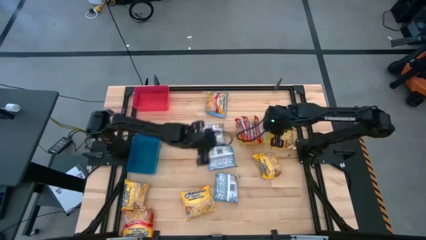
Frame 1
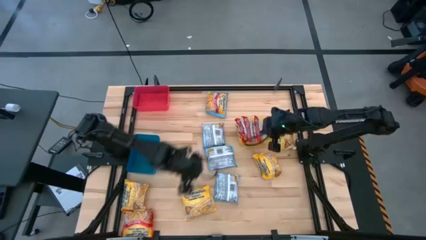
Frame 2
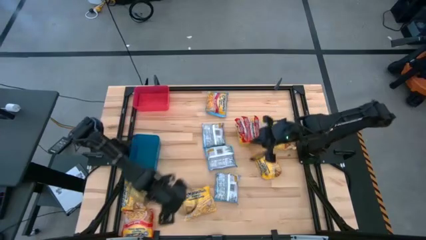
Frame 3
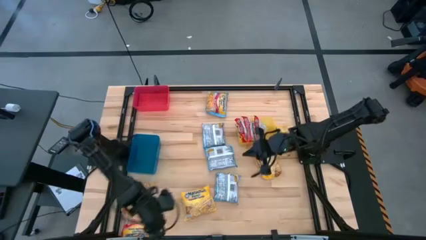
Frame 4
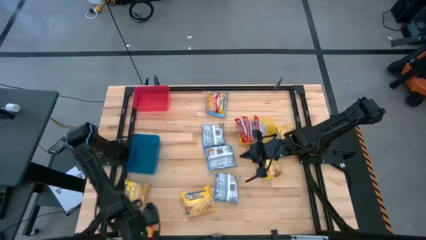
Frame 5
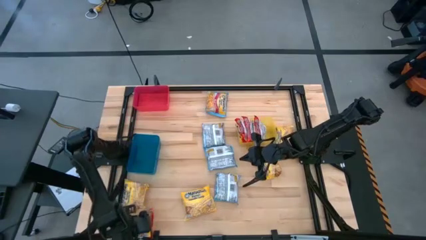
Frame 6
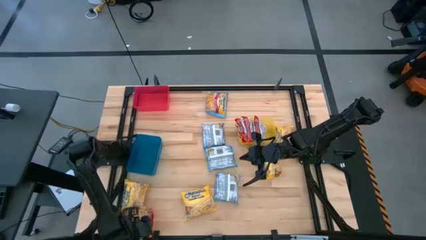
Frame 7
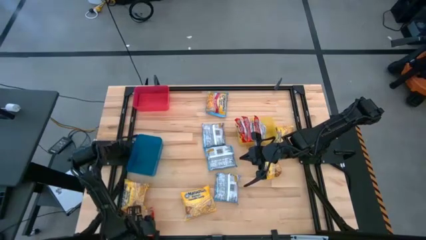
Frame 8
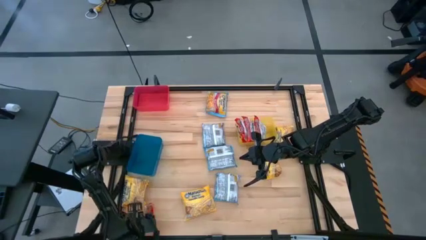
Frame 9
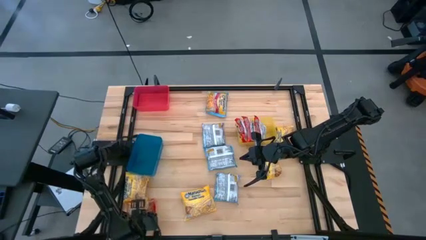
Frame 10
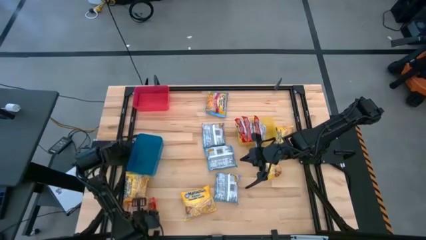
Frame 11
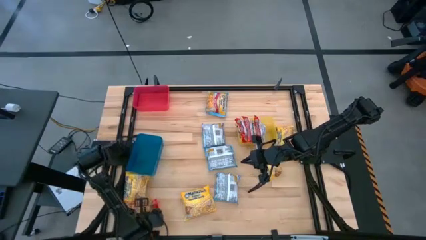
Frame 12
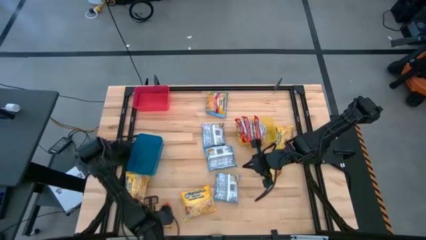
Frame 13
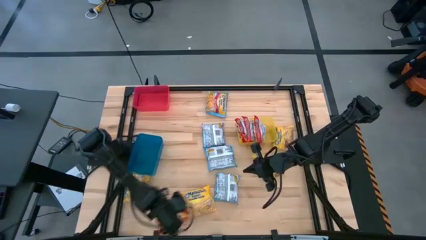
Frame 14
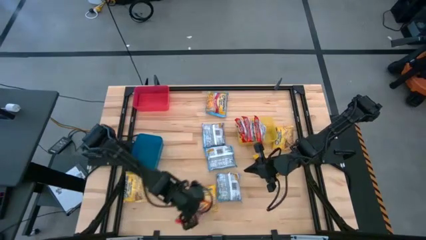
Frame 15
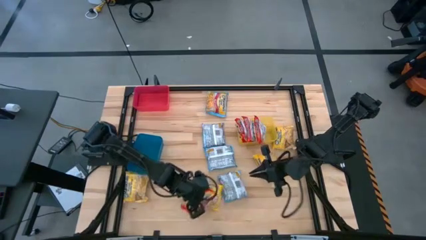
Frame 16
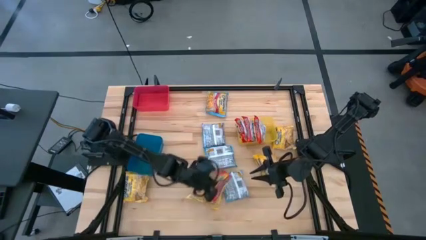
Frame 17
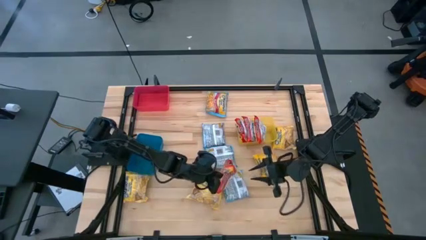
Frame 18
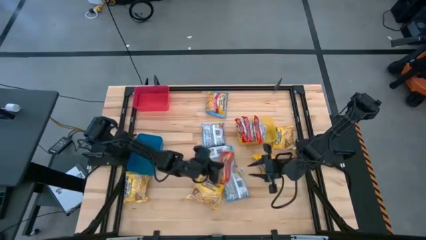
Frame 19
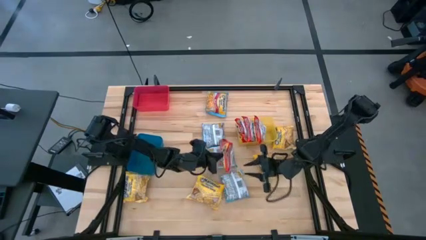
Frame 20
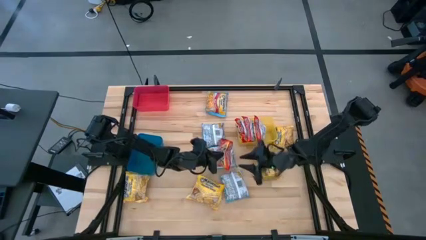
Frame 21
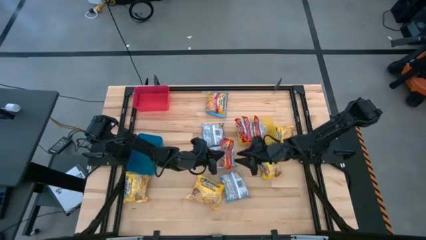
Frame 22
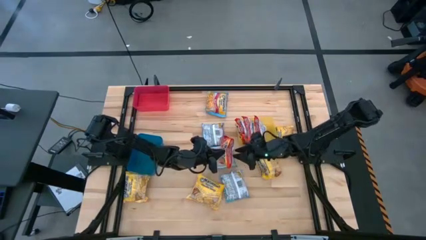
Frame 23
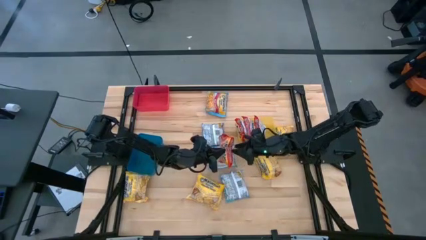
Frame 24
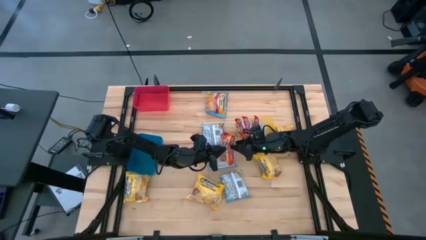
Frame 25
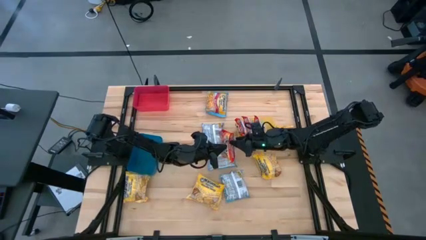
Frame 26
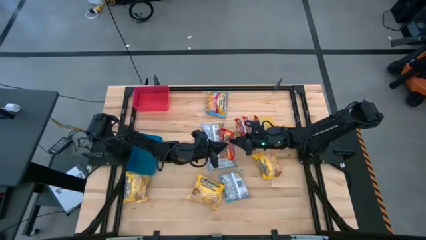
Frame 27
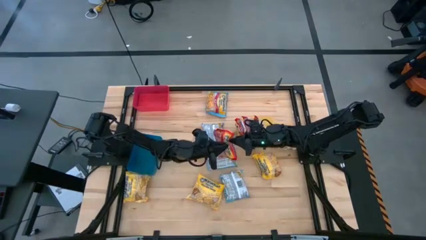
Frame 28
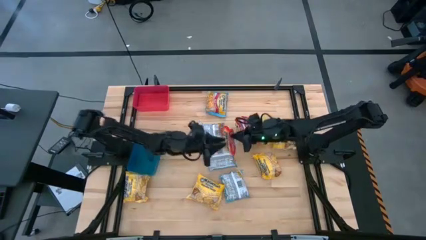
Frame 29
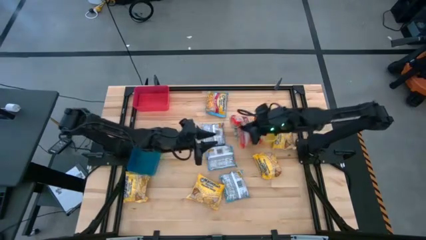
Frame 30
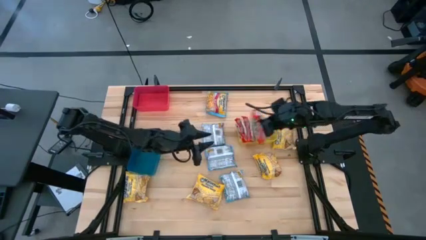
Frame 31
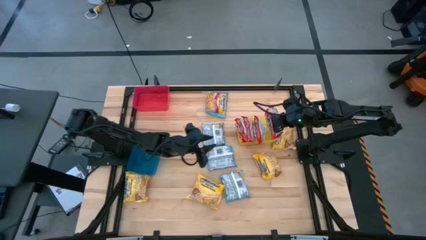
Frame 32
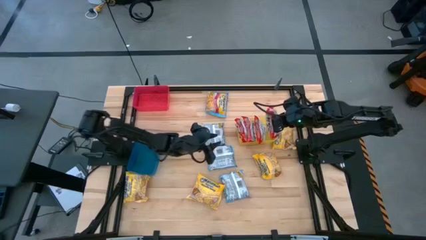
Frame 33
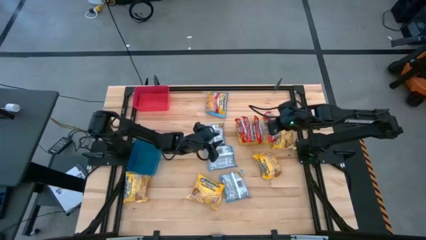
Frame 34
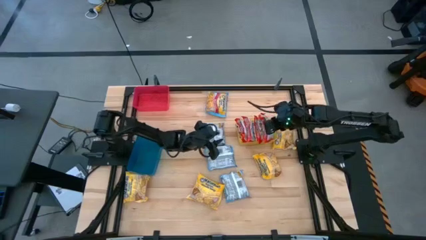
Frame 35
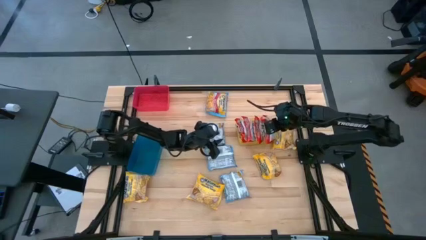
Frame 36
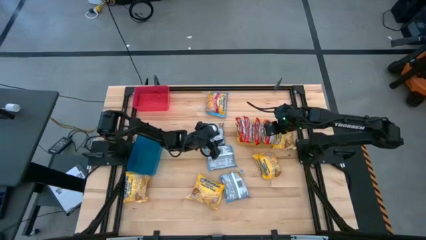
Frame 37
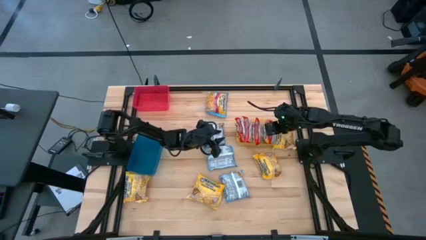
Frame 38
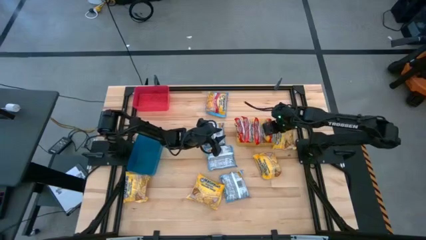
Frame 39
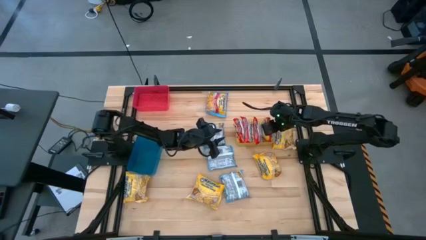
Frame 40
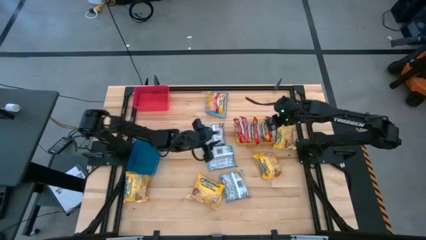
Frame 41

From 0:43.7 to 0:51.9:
Task: Sort Maruchan noodles
Put the red noodle pack into the yellow bin

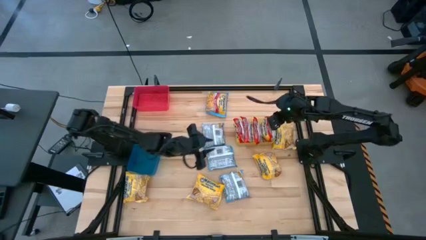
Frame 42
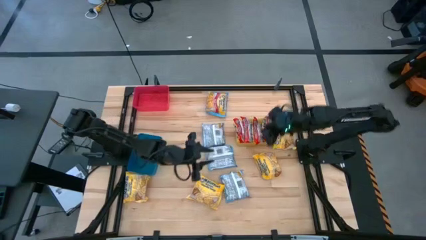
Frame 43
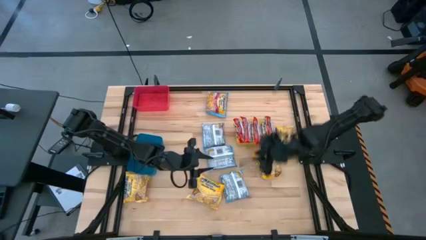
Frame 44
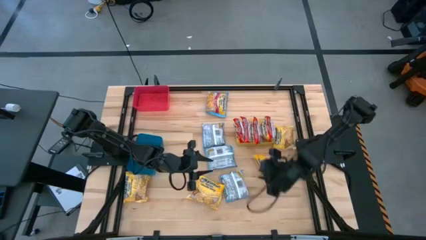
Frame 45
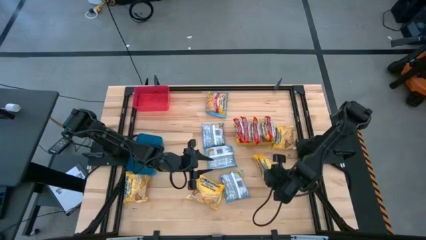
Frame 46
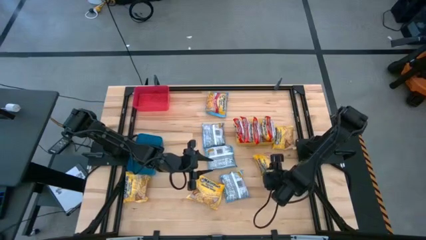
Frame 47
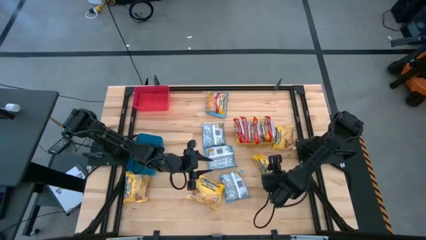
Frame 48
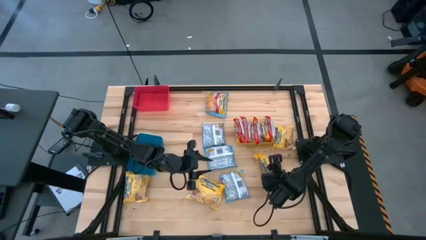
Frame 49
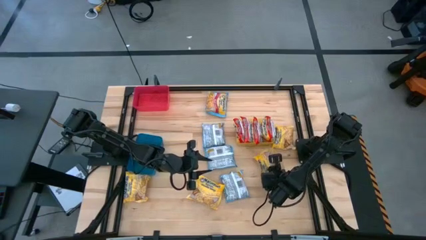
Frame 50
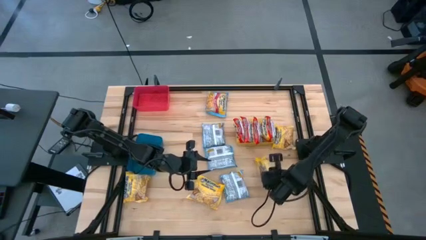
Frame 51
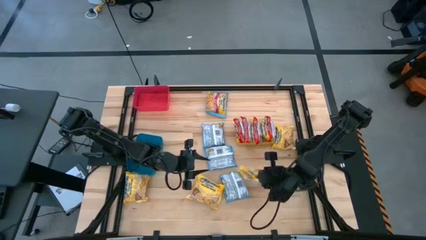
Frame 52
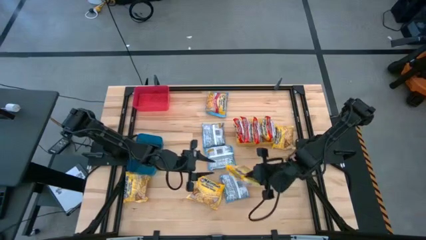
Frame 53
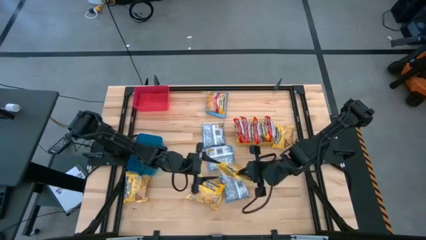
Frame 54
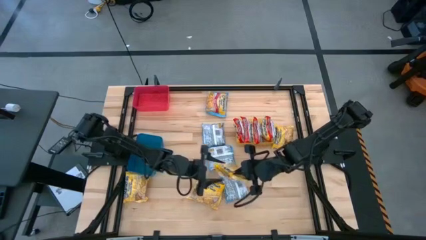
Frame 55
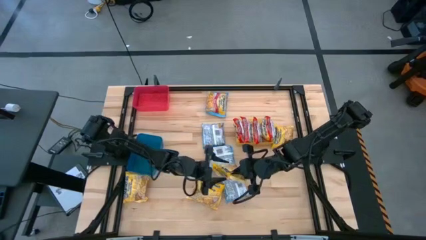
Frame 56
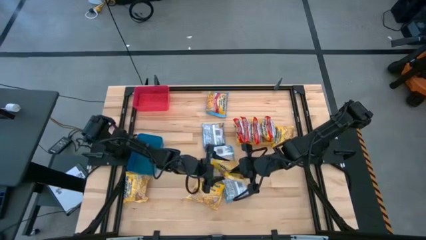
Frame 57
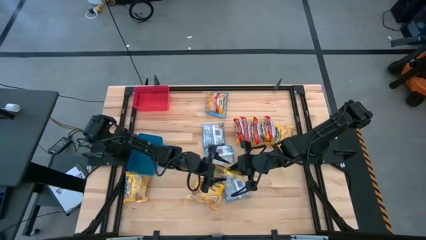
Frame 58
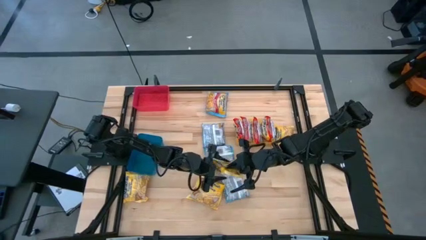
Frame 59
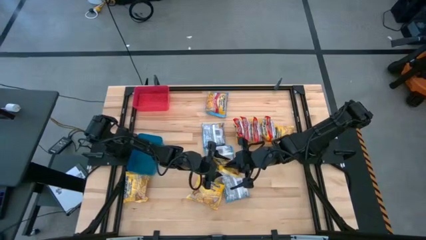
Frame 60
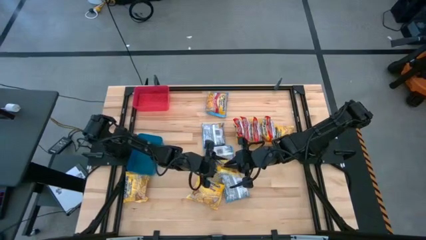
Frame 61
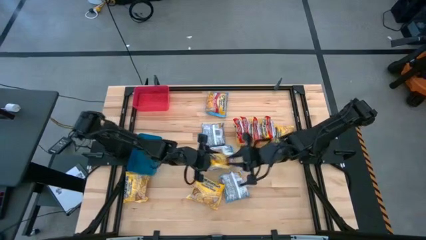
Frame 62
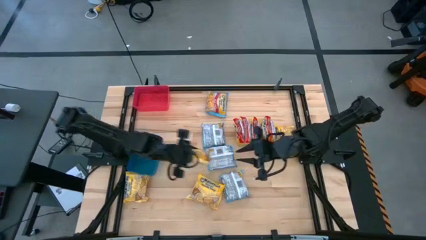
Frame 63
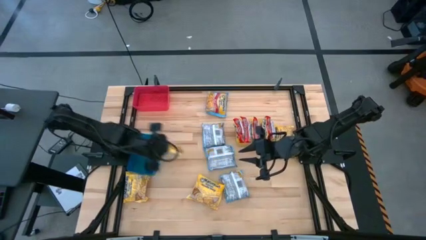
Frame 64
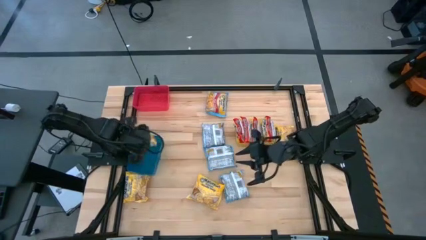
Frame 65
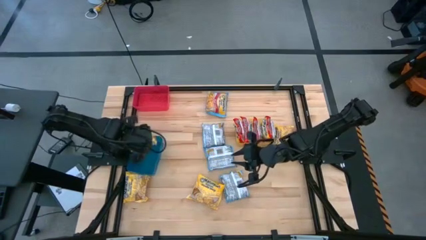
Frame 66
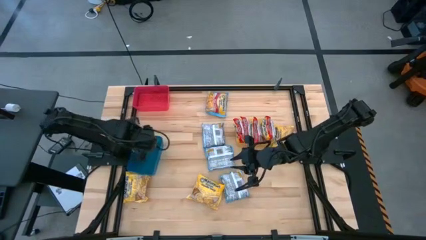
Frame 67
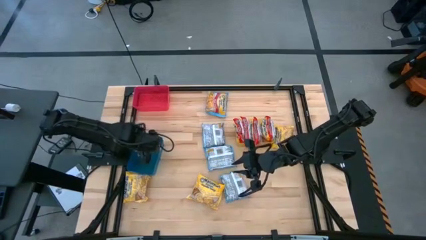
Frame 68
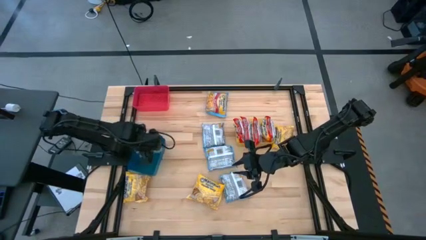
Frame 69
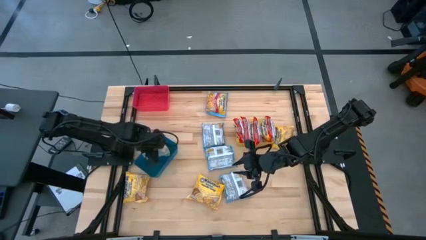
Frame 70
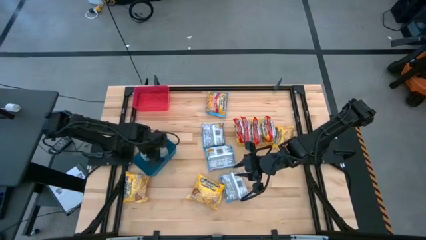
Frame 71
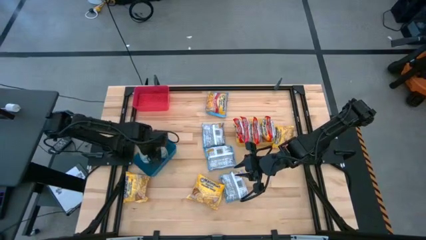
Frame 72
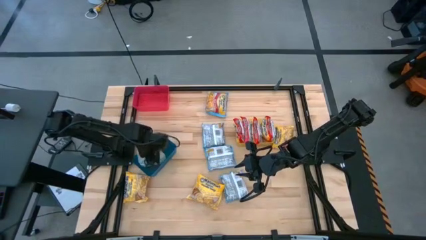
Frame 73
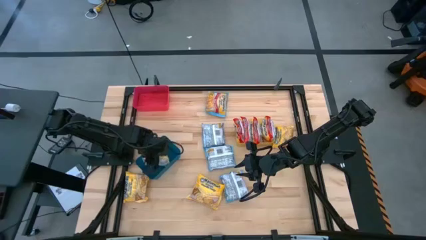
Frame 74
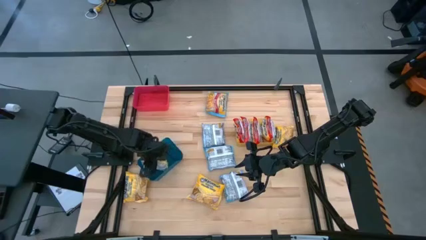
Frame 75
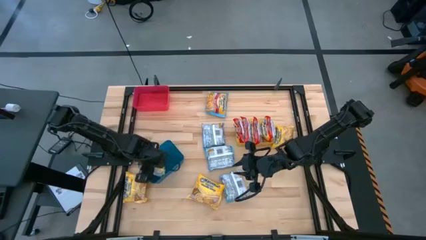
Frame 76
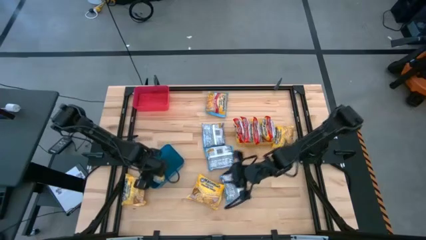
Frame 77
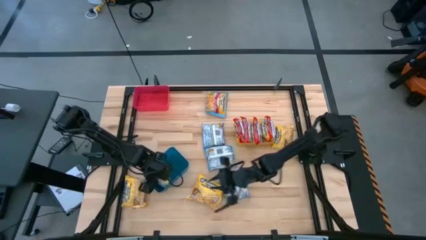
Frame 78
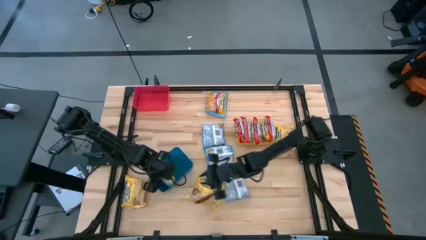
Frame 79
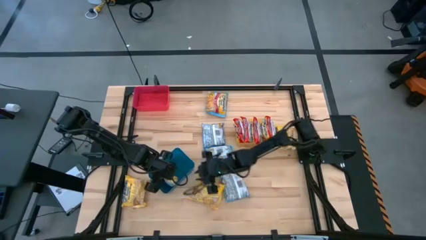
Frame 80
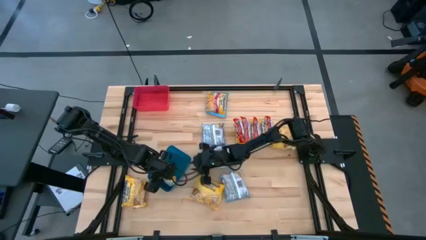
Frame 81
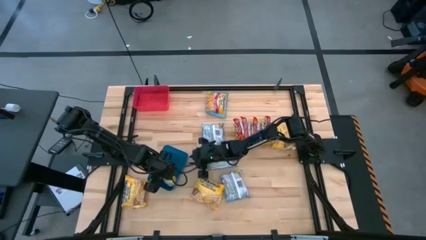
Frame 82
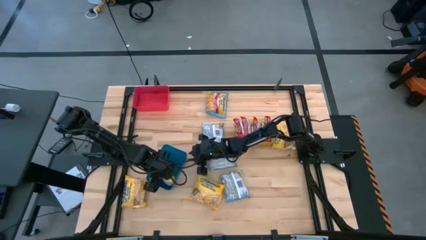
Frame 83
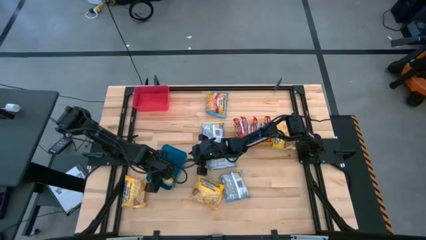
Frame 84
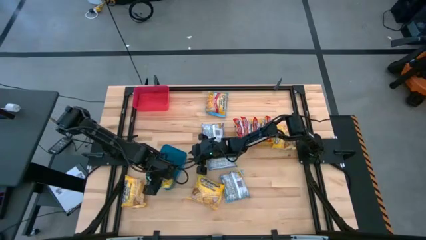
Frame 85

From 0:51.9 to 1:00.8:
Put the yellow noodle pack into the blue bin
